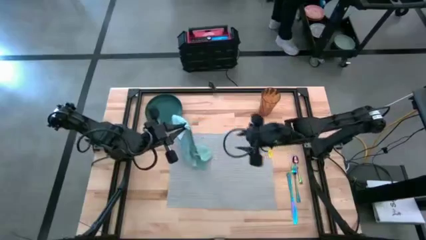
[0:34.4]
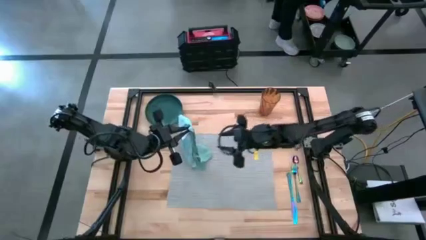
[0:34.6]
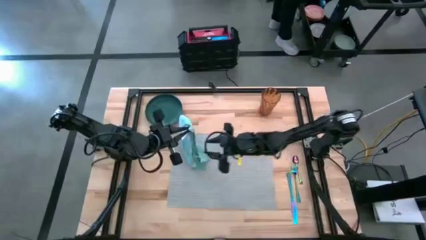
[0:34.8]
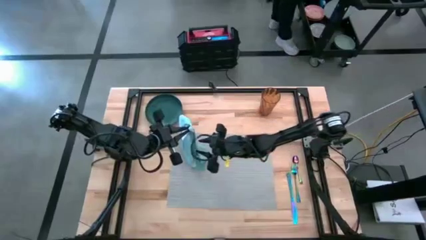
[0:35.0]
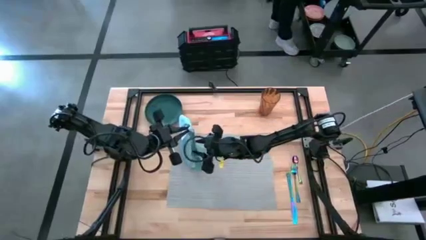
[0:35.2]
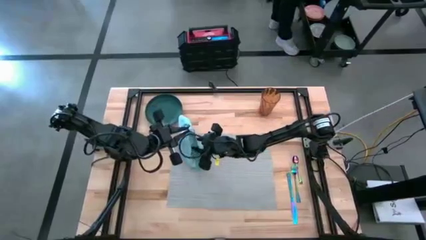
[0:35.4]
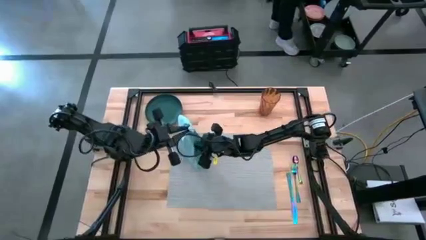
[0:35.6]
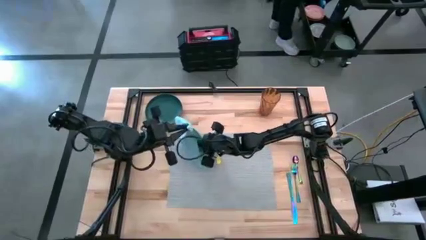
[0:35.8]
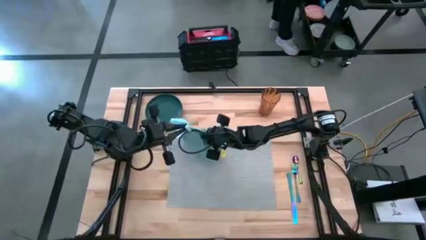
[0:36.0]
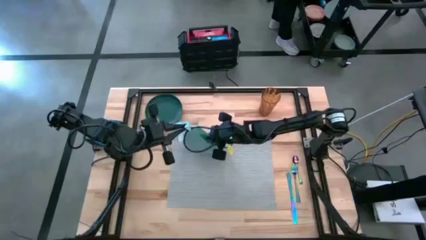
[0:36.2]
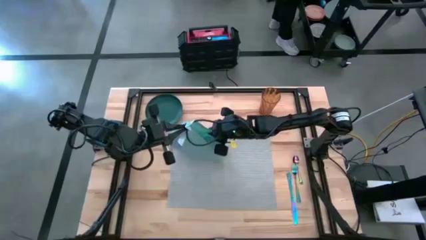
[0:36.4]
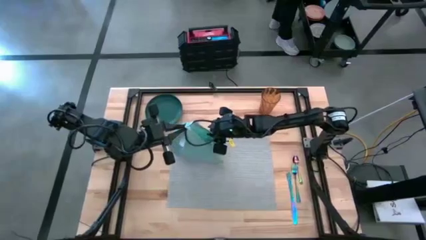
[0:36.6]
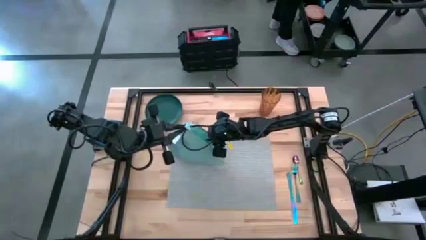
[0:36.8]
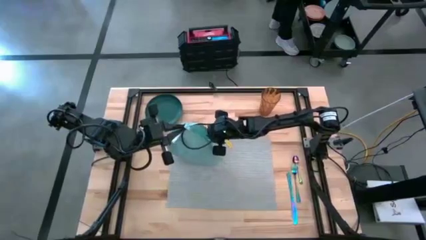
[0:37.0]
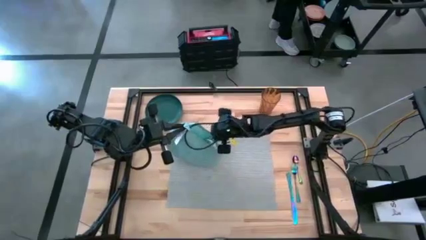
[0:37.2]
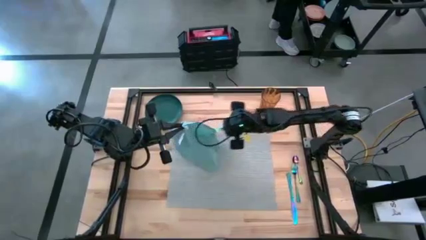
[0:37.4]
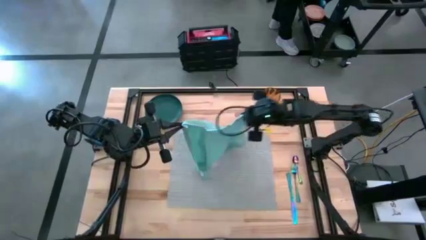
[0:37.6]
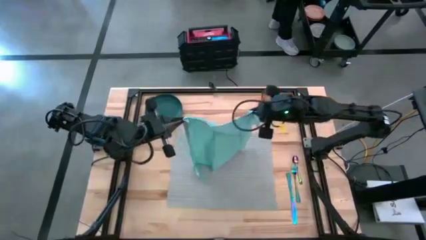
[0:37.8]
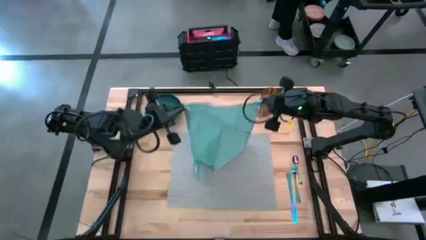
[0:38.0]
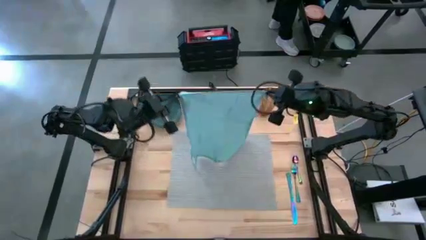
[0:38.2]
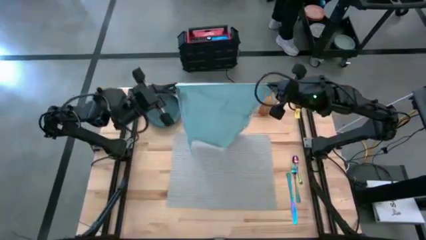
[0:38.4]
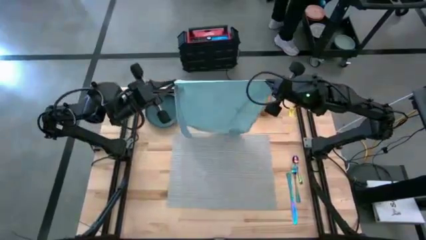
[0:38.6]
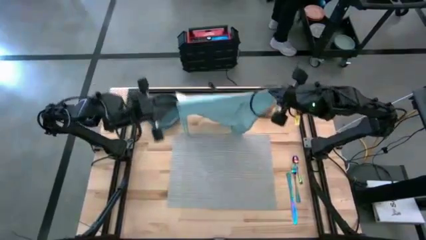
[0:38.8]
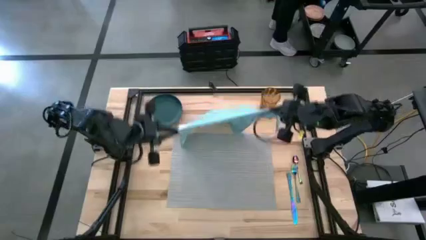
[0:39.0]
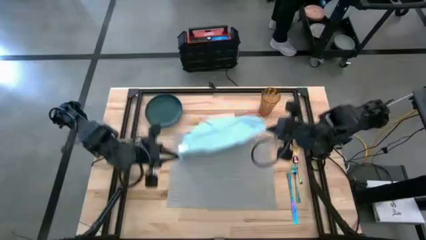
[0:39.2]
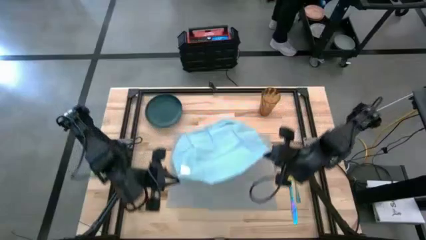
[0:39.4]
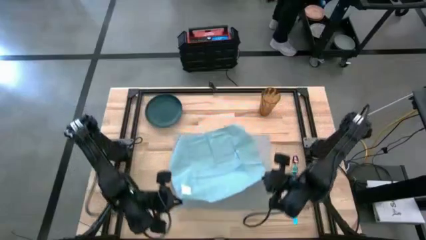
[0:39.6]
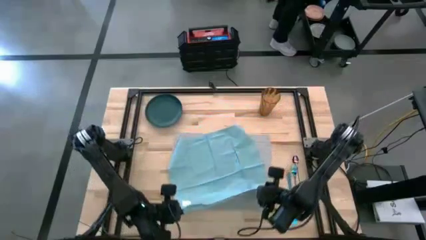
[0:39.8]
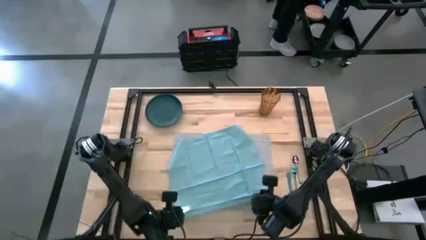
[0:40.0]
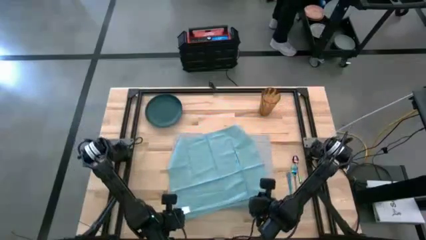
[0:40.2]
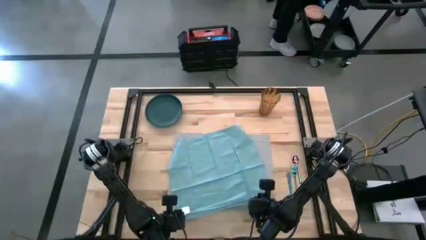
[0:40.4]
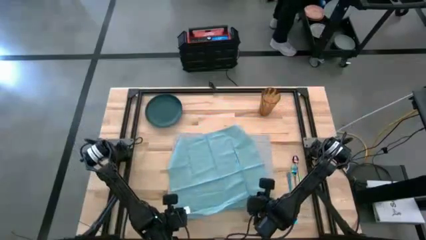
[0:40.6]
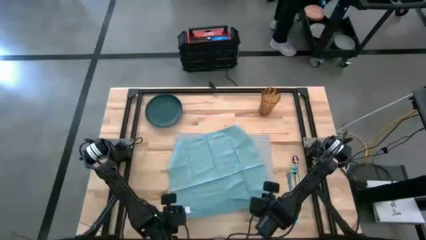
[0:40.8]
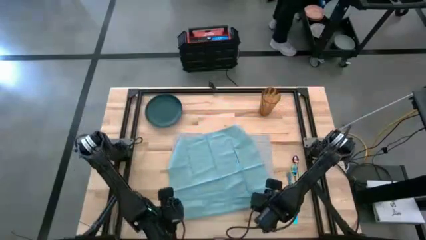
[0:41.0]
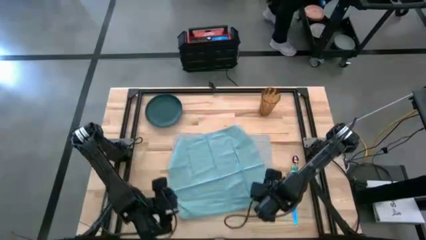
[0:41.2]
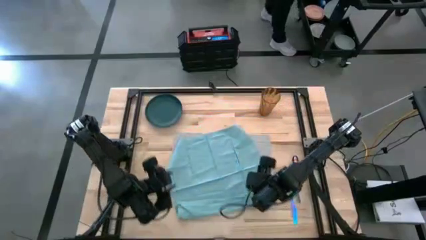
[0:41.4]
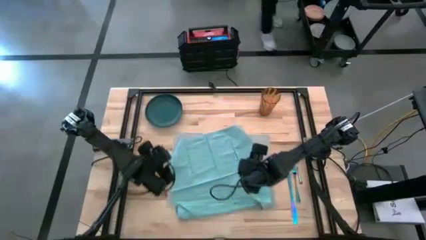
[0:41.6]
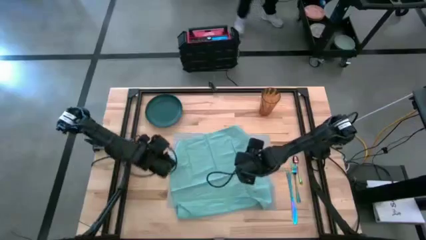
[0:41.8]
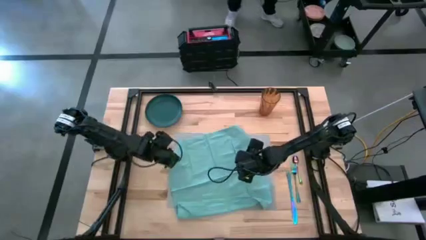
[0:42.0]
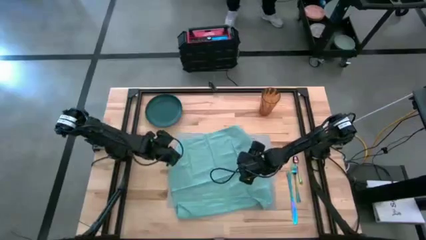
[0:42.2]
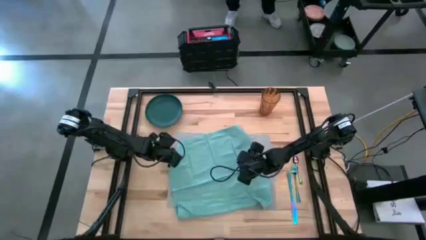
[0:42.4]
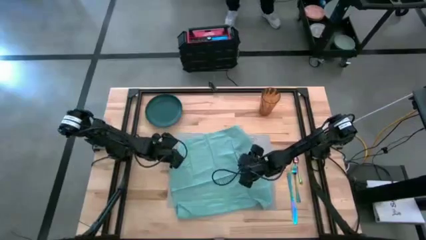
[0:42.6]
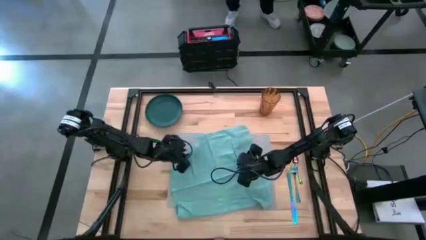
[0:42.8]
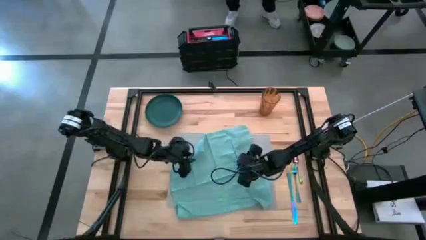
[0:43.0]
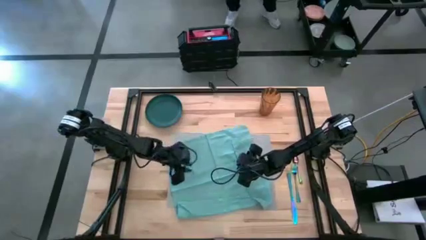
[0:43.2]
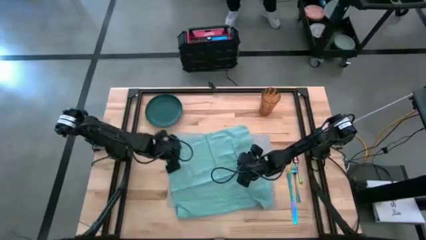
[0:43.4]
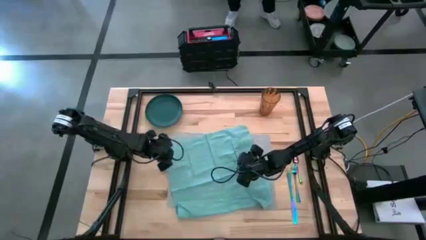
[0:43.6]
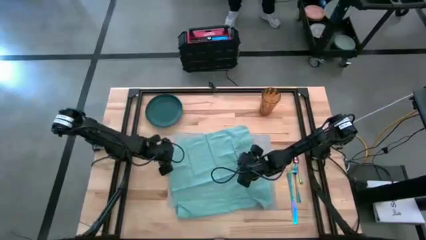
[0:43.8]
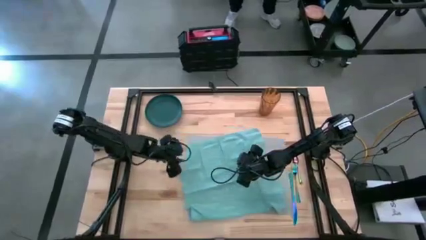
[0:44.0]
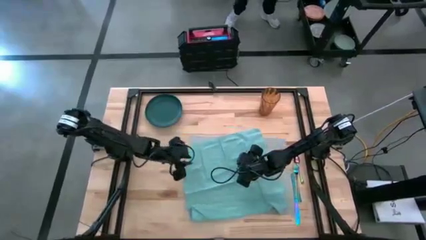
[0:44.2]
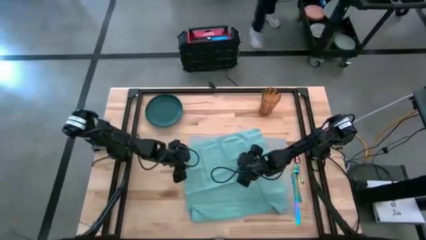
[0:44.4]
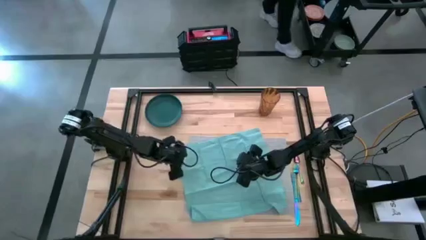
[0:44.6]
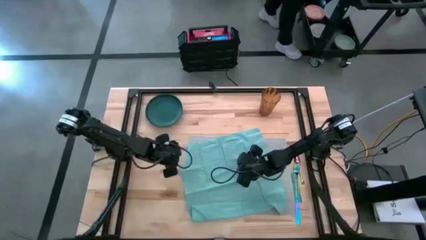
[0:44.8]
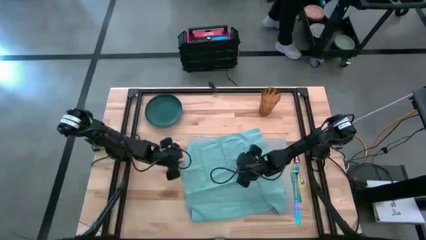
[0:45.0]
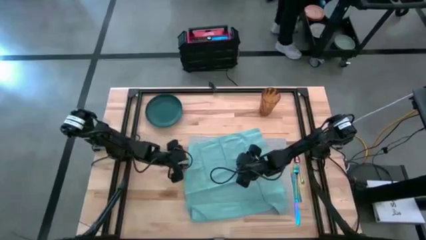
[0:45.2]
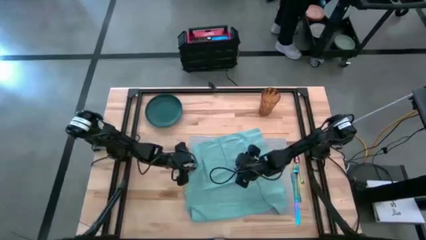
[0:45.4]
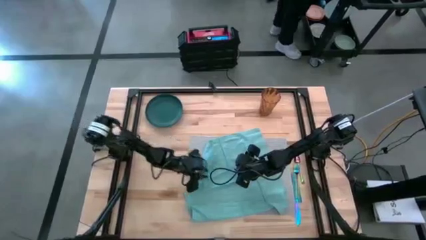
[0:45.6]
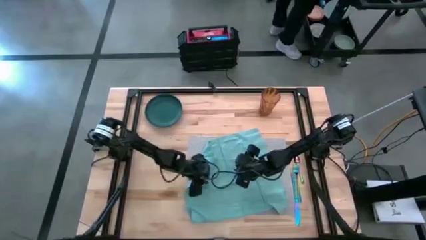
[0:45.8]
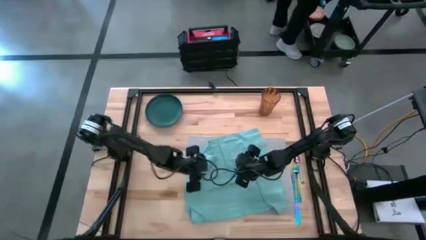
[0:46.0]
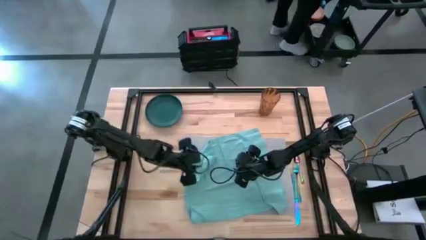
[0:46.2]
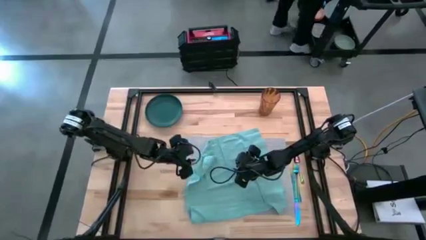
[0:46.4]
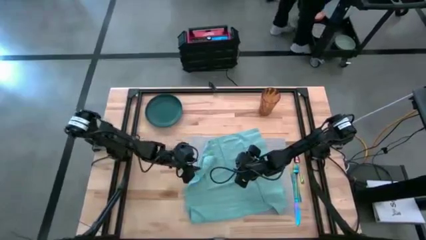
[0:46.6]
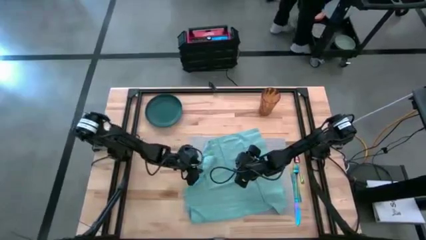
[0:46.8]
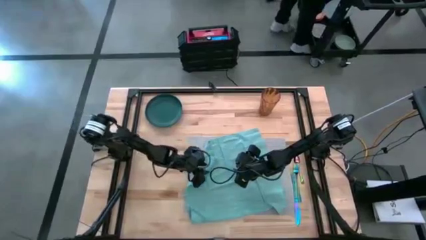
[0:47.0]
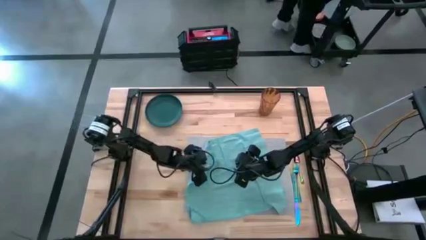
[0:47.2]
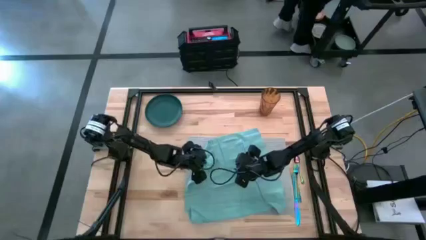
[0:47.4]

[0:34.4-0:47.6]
Task: Set table place
Fold the light blue table napkin

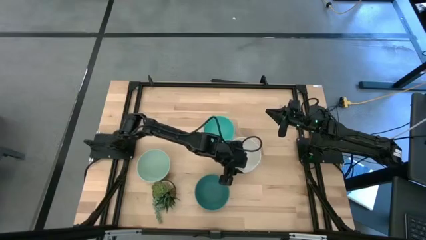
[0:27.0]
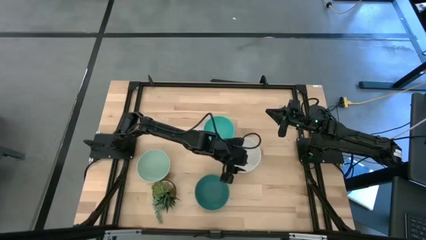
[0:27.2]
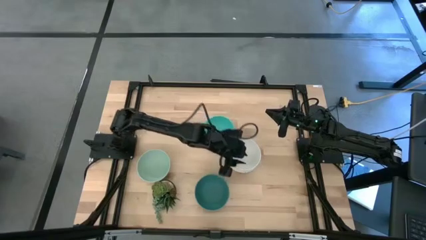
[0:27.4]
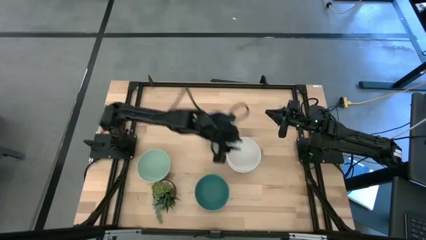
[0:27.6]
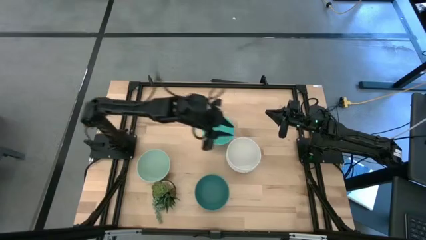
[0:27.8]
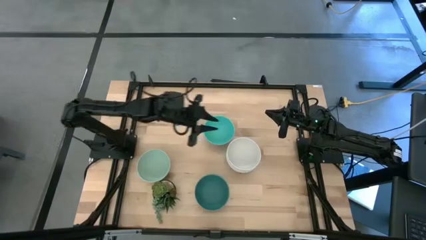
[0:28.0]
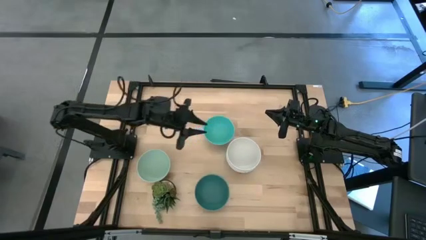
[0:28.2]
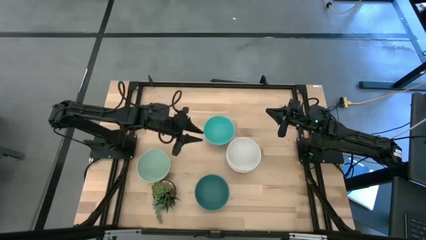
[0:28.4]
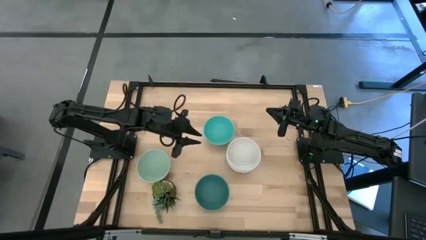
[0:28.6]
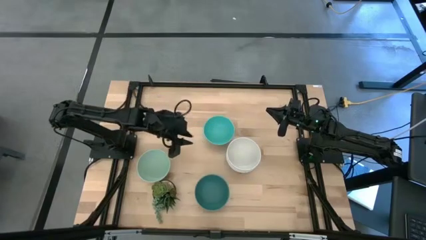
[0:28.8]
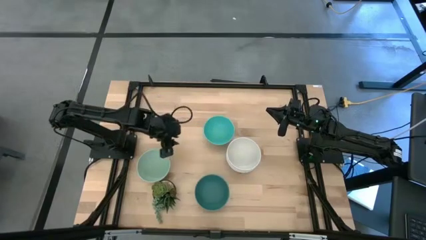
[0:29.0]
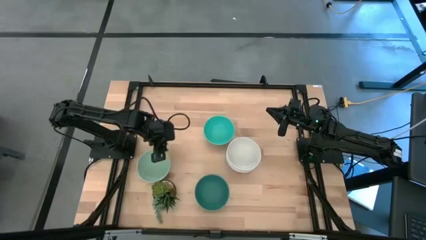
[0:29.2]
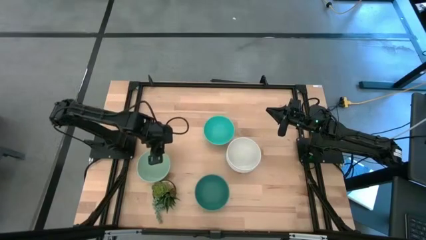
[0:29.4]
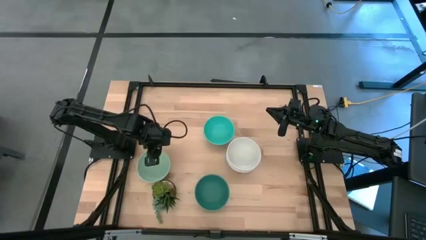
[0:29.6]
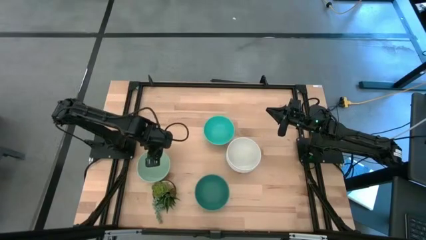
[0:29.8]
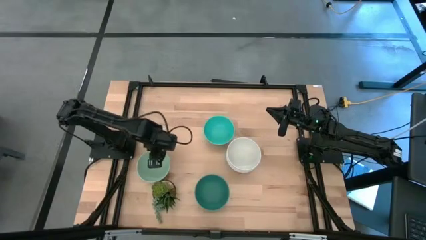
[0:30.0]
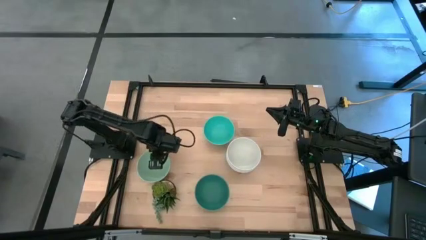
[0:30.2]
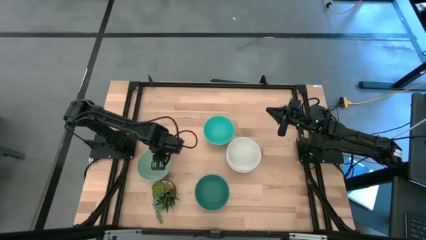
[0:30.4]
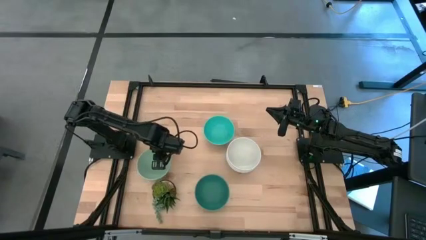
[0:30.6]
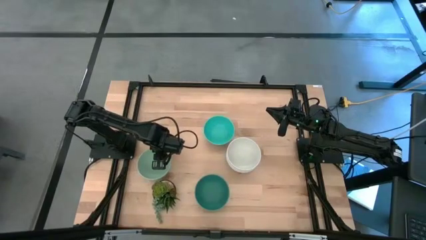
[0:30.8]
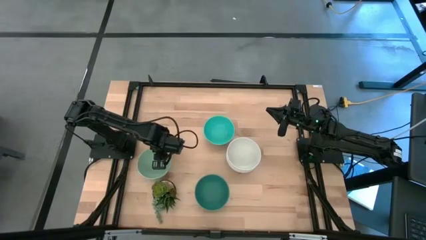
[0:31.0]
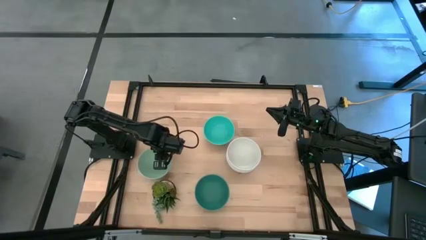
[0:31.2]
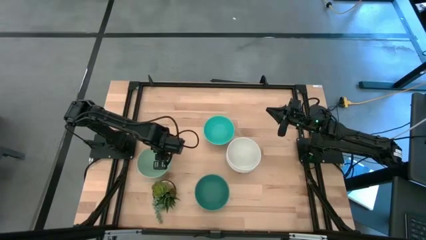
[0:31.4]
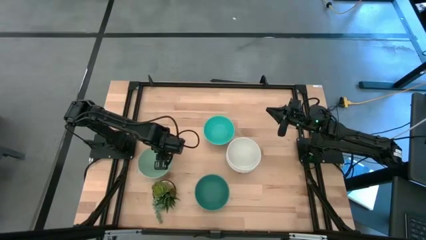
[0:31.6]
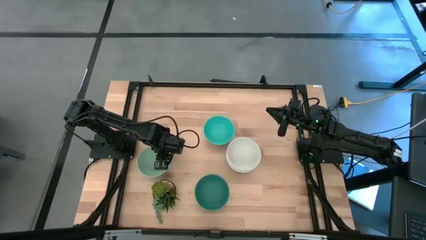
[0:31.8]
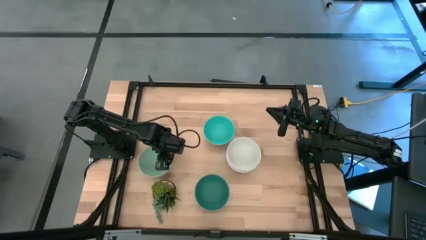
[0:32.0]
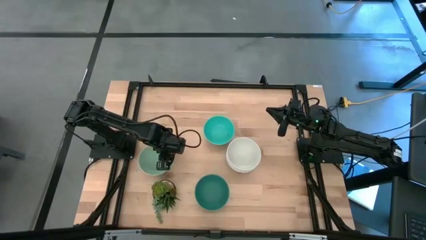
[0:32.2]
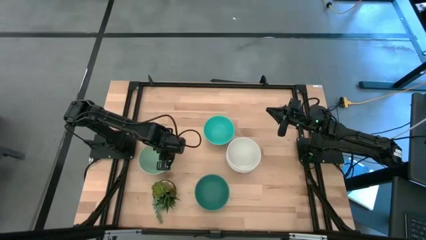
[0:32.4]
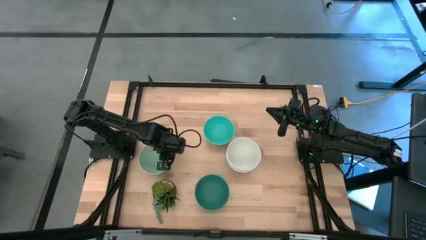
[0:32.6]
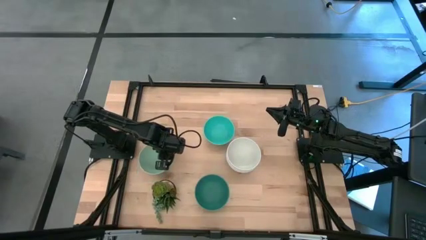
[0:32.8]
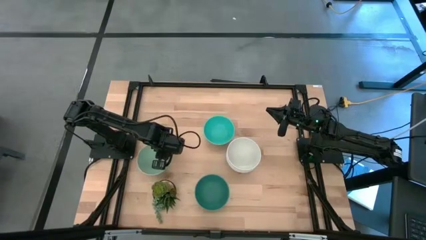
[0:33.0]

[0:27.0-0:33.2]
Task: Nest bowls inside each other
Stack the light green bowl on the white bowls
